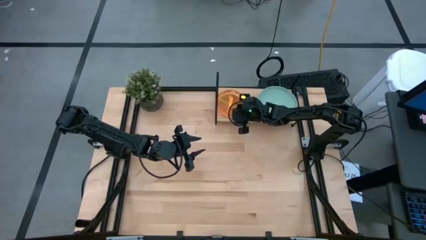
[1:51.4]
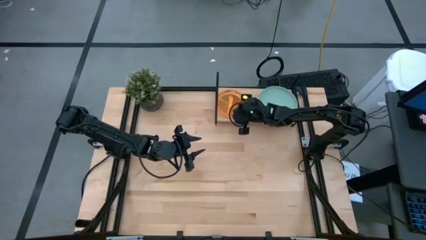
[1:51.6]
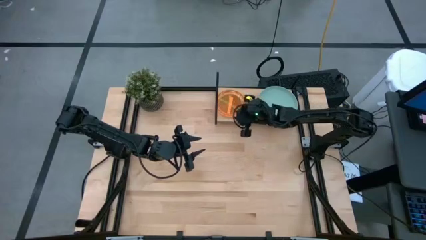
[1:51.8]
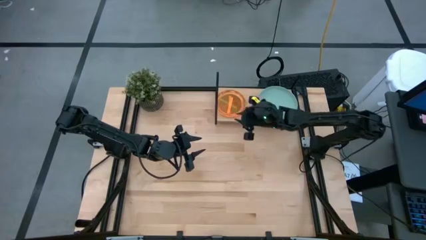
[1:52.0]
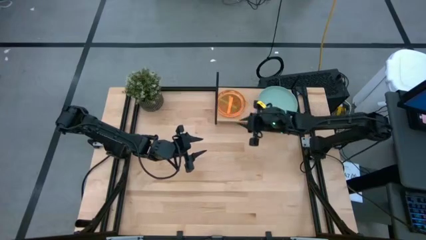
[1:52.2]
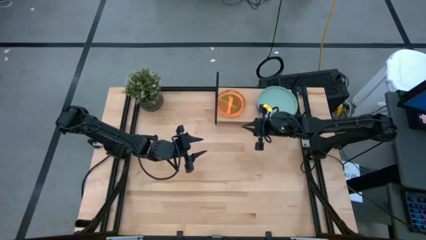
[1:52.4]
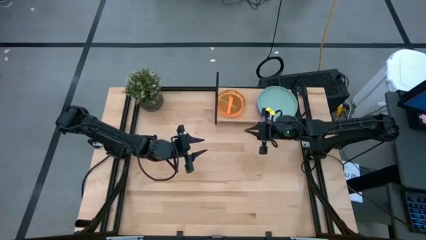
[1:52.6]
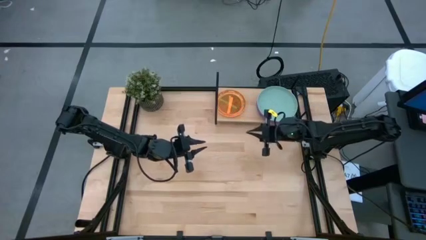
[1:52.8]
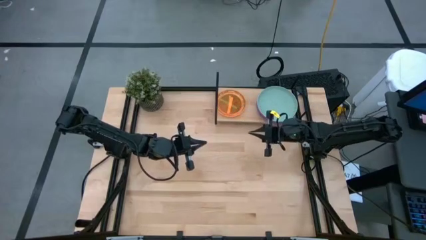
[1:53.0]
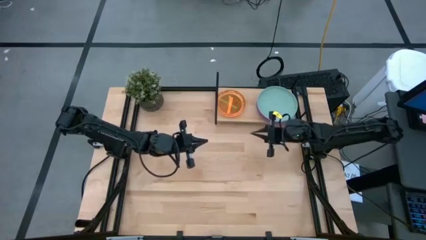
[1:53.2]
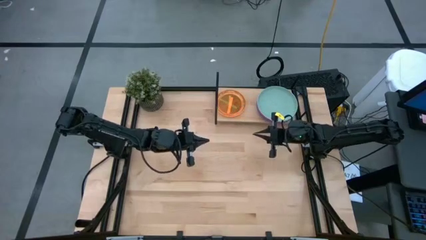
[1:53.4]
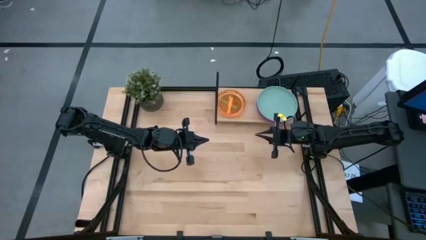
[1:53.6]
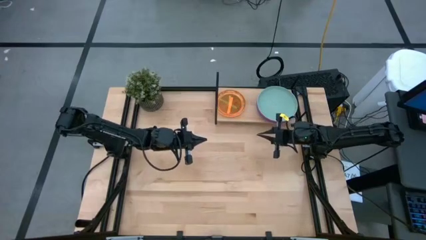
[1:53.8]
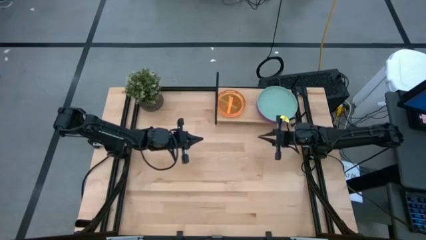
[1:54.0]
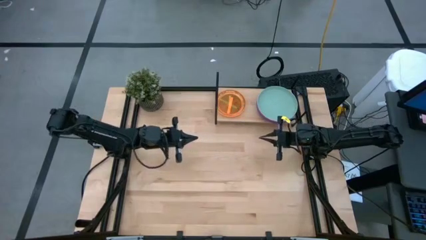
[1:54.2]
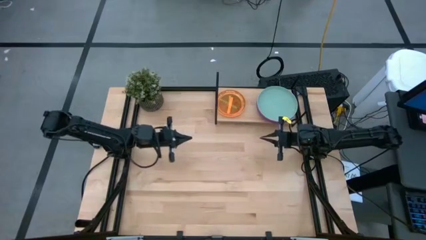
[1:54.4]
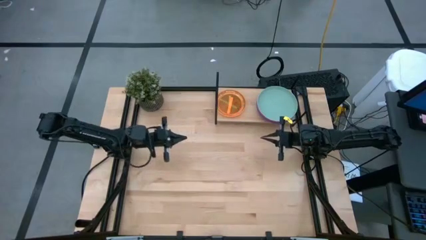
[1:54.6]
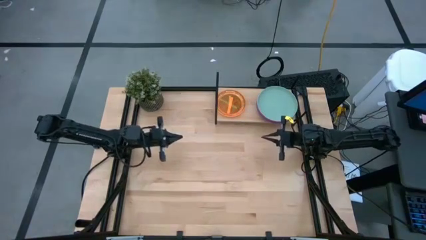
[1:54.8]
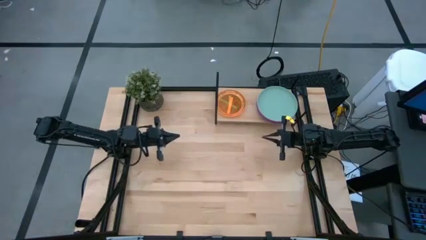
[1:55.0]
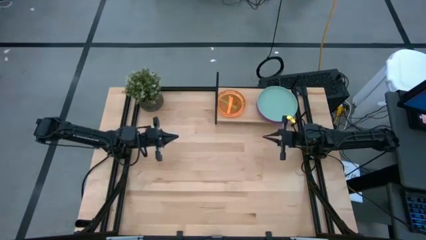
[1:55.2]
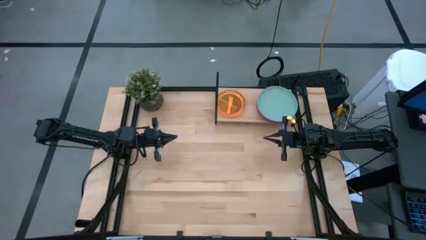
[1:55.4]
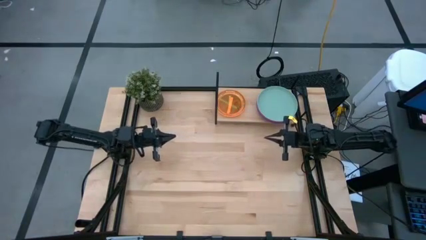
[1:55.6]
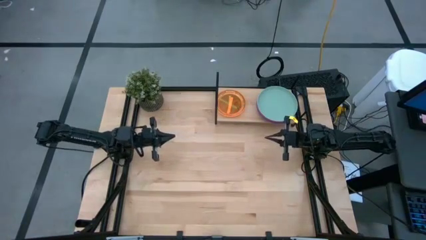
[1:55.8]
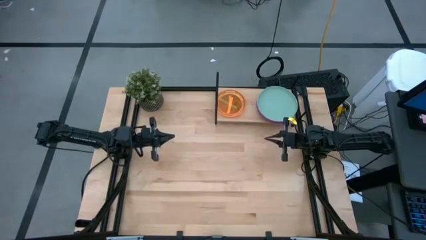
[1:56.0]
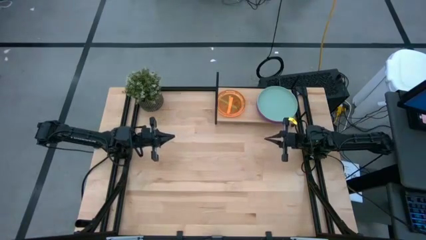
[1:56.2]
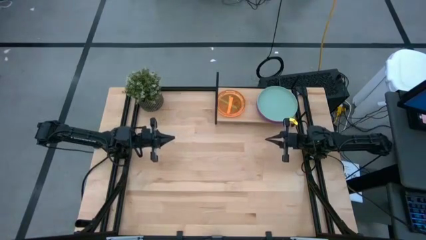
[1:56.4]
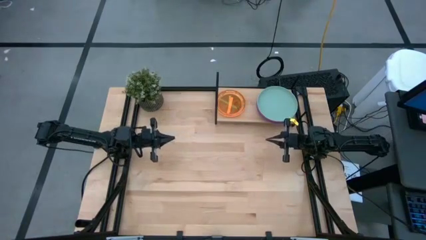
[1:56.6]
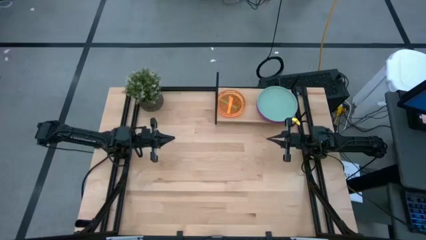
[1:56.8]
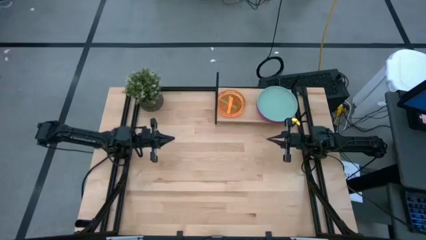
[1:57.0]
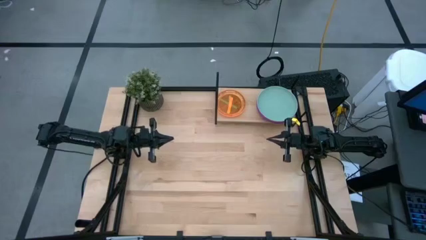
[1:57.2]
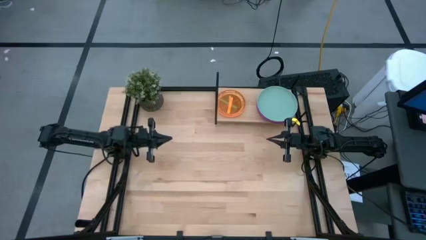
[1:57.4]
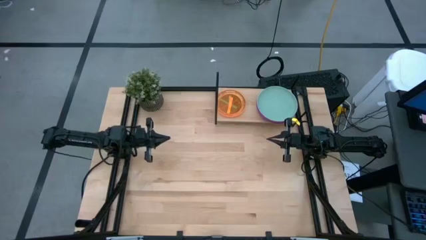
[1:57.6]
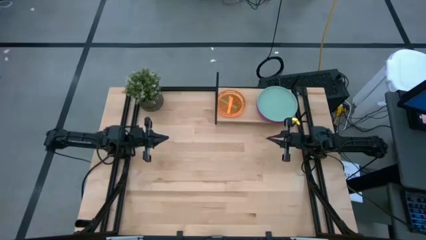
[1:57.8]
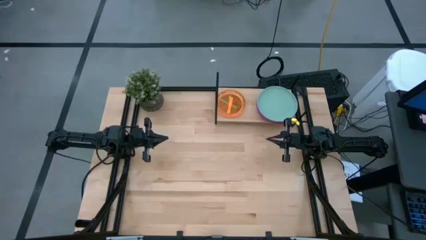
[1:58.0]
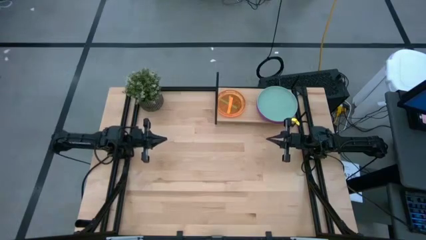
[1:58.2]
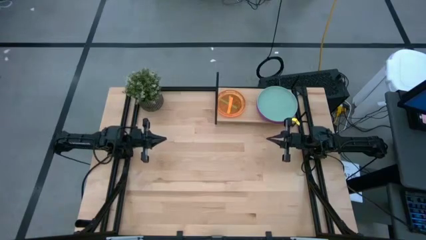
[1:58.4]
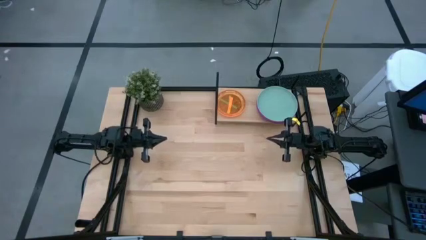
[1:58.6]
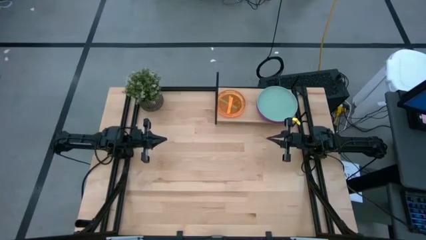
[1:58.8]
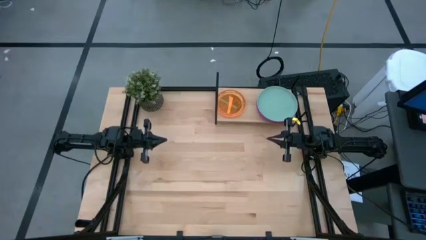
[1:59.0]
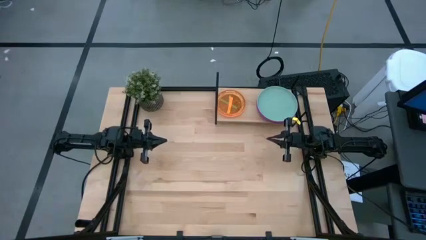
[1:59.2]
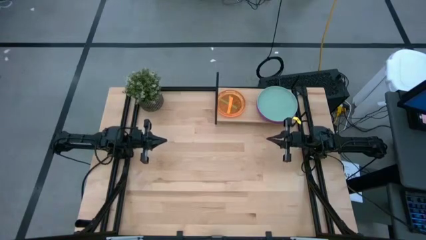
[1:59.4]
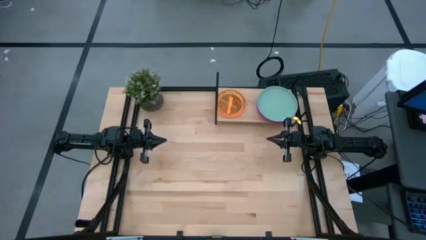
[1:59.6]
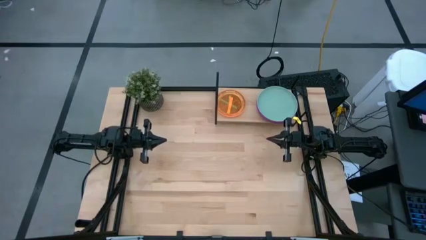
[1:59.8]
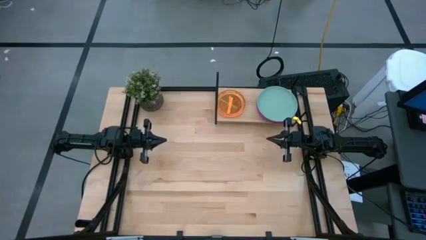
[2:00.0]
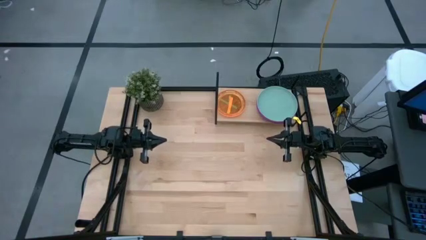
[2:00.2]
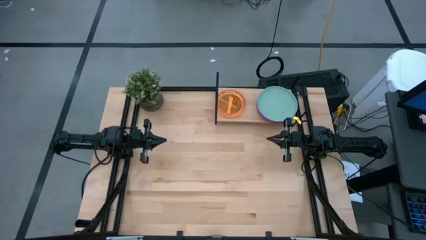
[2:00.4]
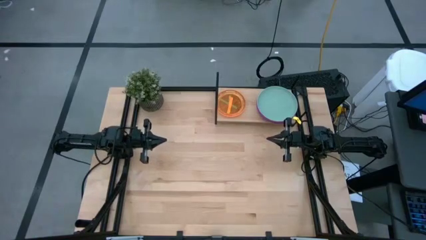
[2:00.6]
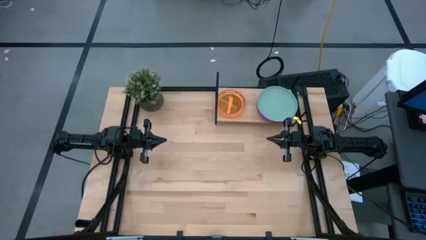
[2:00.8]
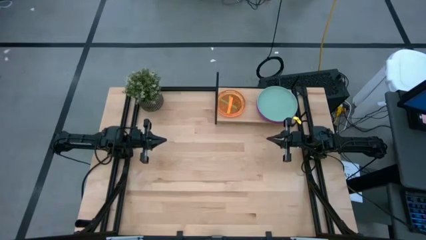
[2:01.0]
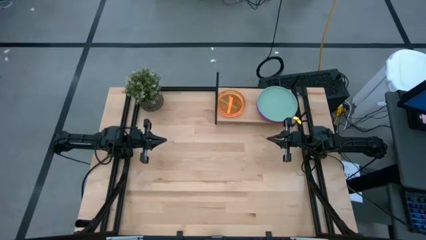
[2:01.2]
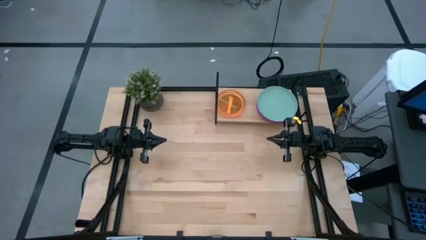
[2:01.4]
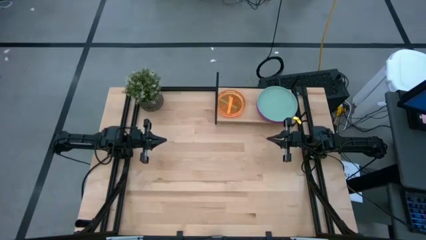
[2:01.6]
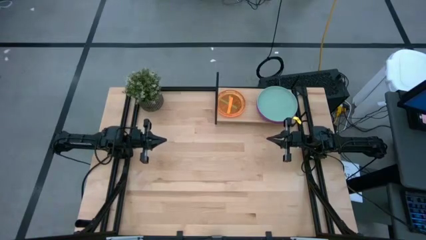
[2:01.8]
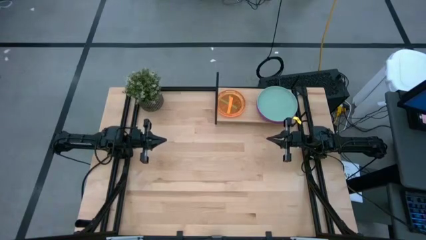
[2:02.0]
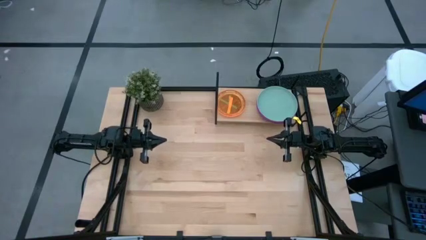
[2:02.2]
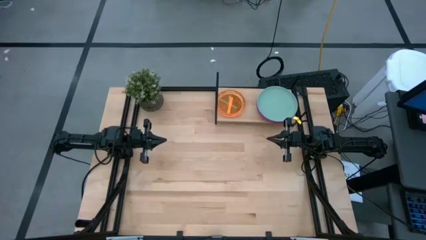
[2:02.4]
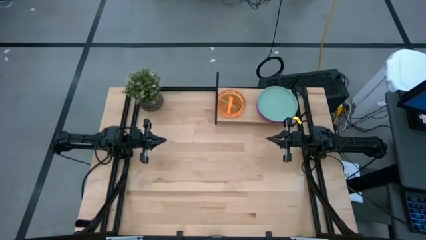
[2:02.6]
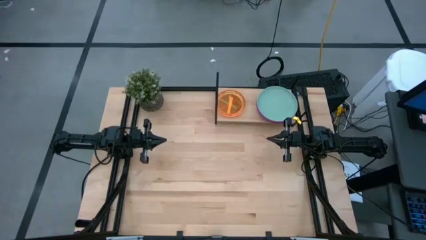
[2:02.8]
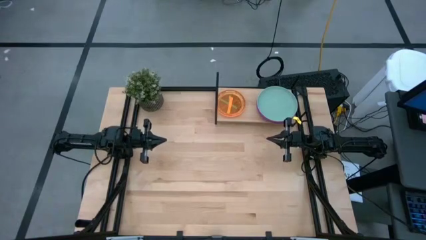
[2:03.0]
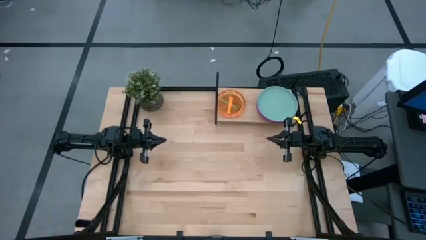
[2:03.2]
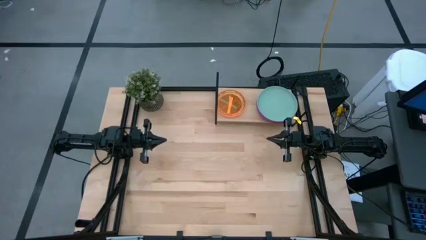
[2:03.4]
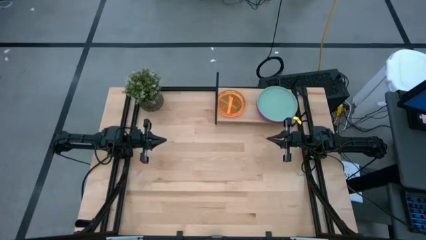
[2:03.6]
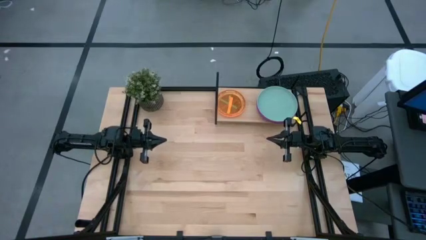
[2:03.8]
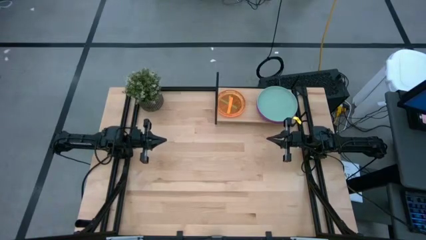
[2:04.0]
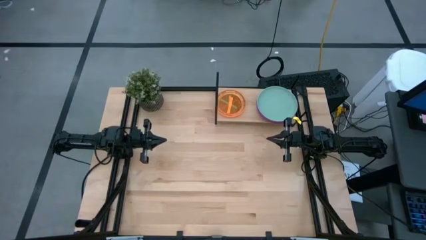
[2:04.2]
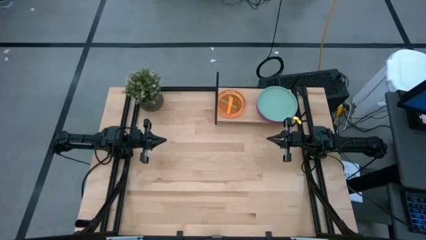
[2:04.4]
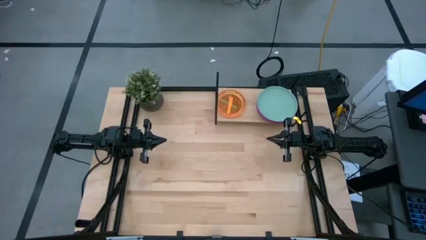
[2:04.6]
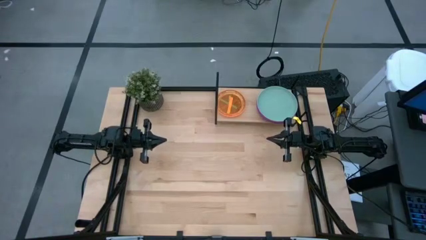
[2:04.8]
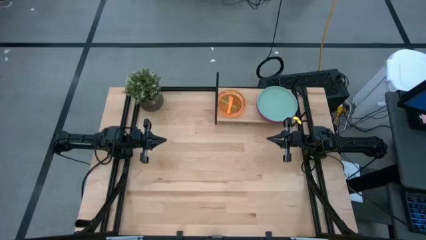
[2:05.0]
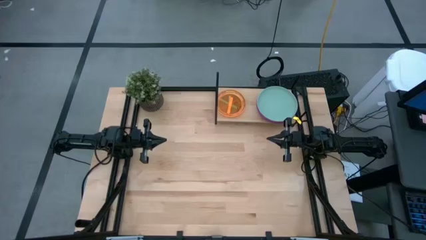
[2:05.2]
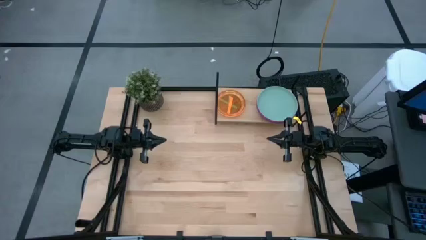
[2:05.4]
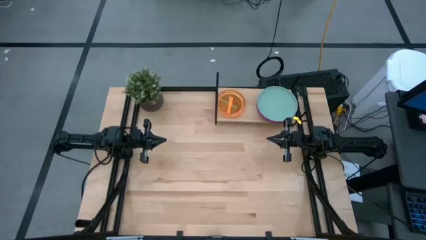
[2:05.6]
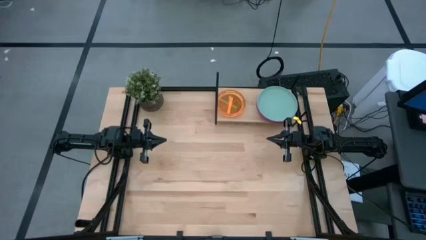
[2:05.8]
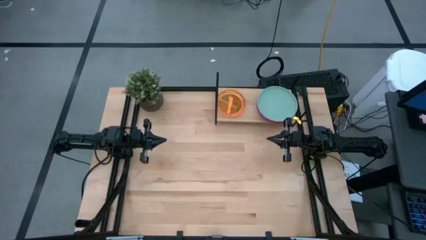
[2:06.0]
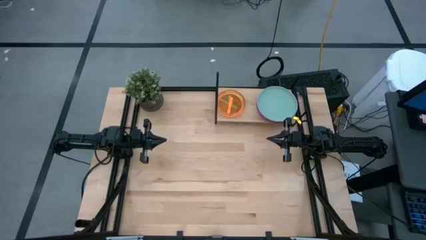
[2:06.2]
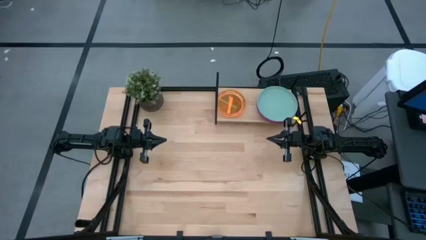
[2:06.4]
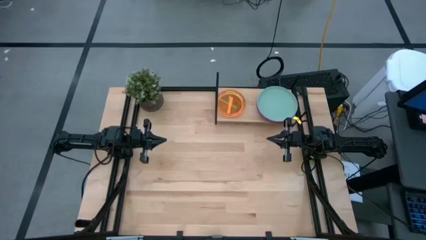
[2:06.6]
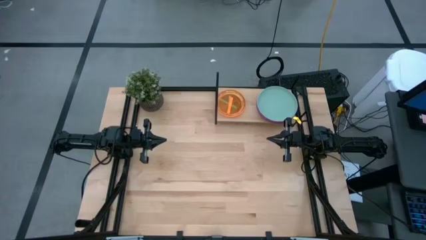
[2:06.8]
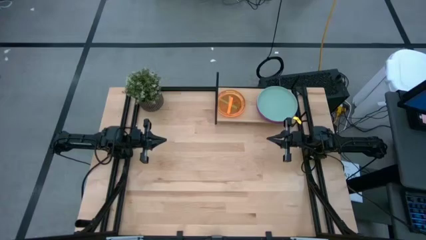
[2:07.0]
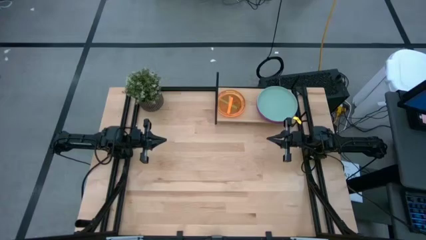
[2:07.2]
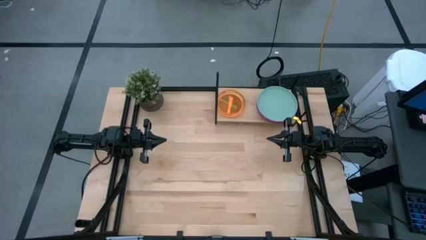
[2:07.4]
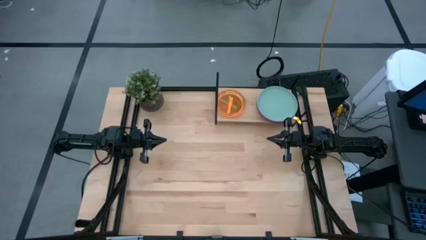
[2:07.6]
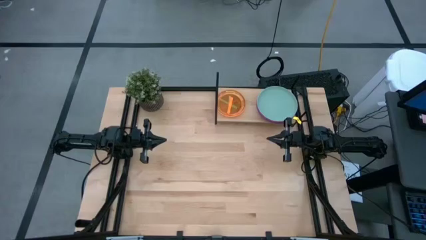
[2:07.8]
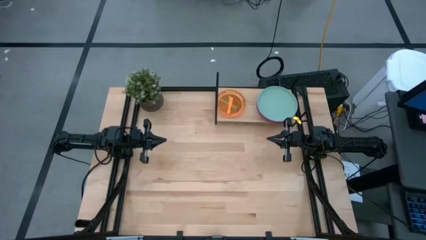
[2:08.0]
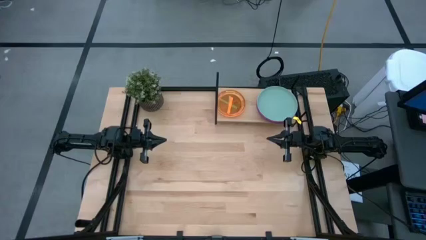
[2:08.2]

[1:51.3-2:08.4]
Task: Place and stack plates onto a shelf
Return to Home Position
